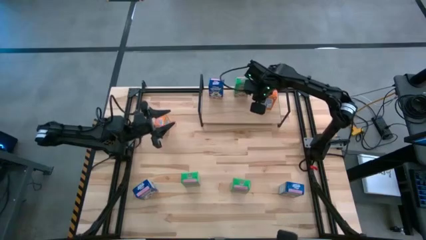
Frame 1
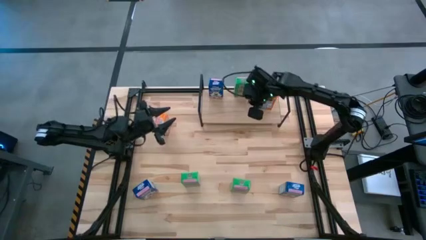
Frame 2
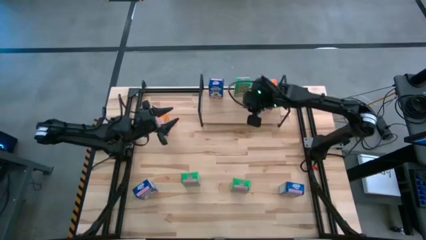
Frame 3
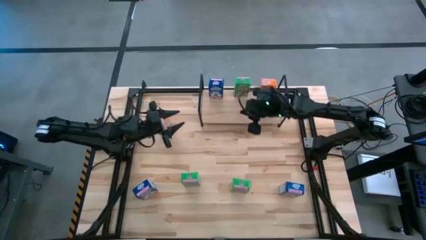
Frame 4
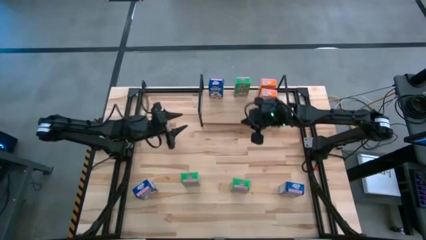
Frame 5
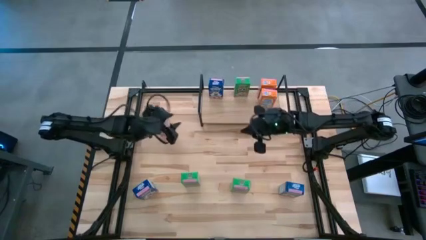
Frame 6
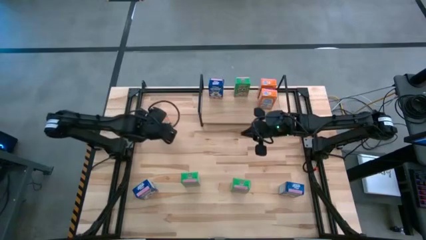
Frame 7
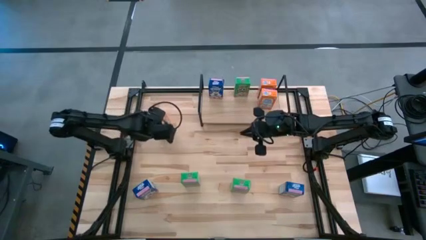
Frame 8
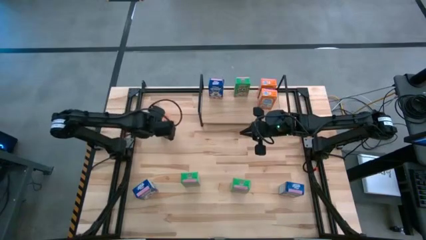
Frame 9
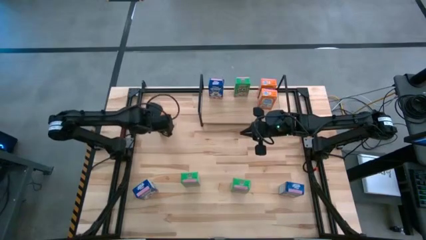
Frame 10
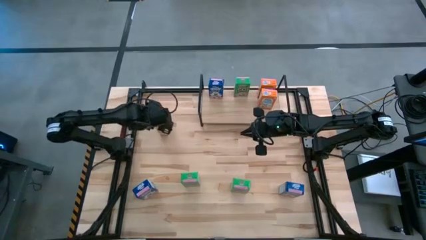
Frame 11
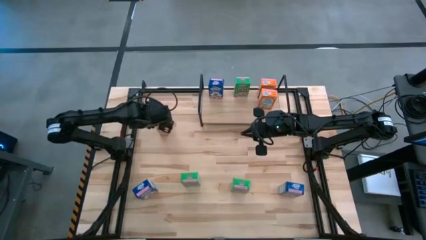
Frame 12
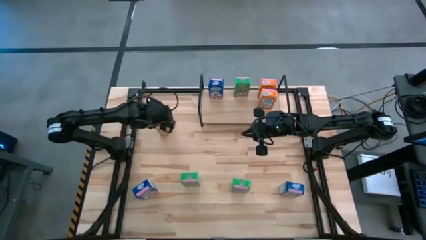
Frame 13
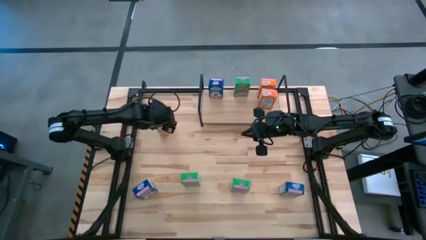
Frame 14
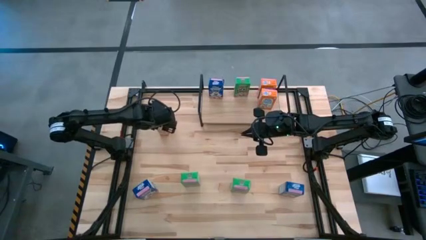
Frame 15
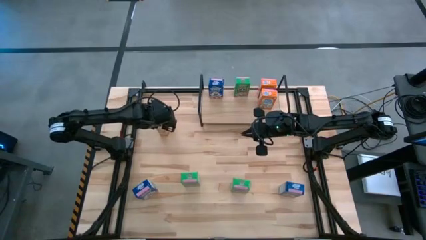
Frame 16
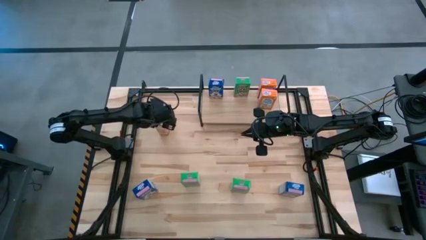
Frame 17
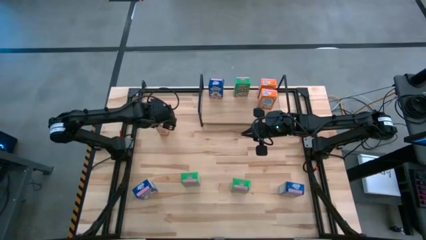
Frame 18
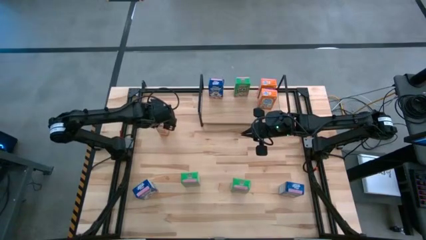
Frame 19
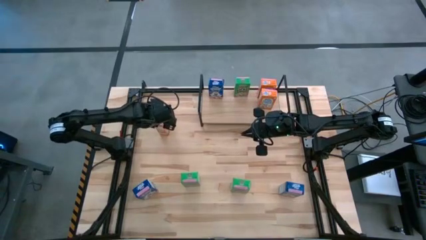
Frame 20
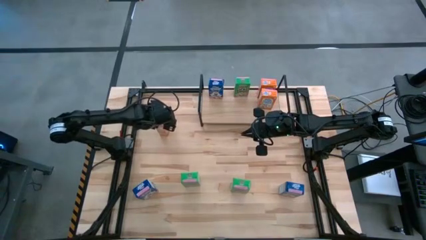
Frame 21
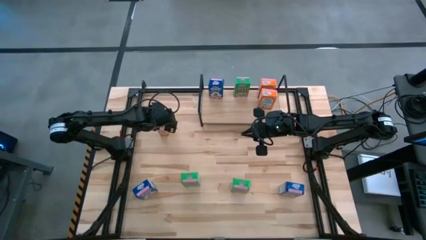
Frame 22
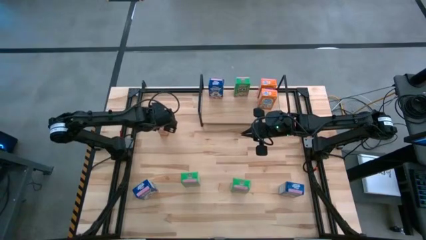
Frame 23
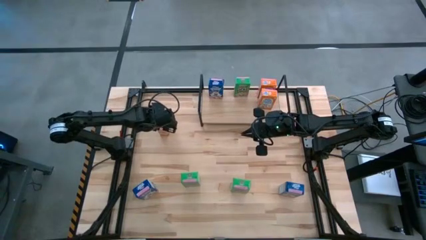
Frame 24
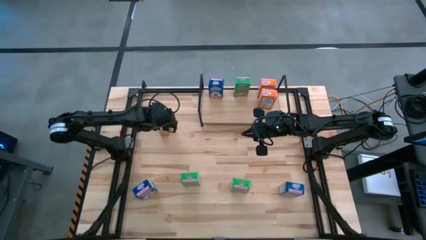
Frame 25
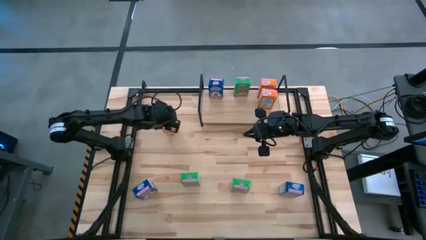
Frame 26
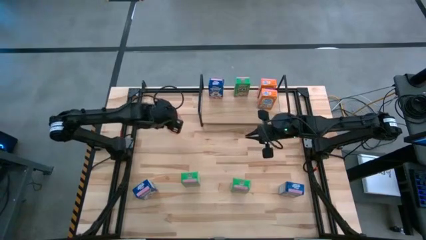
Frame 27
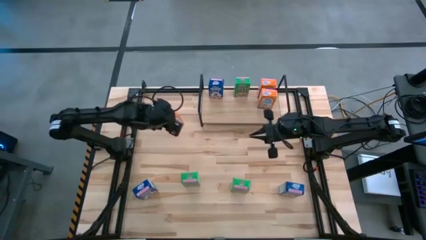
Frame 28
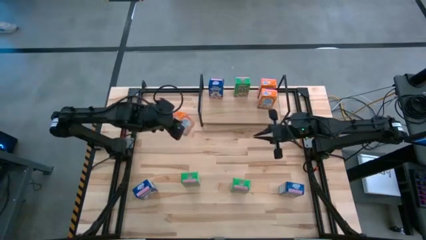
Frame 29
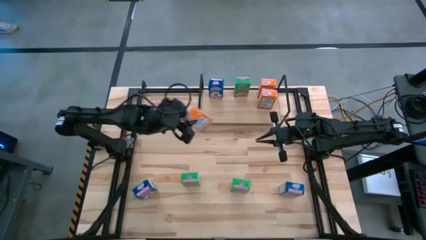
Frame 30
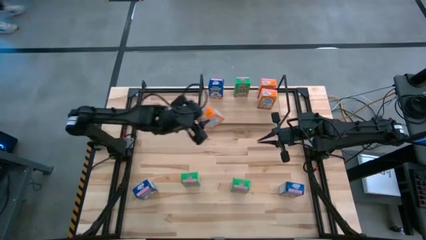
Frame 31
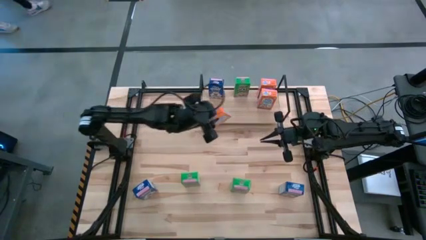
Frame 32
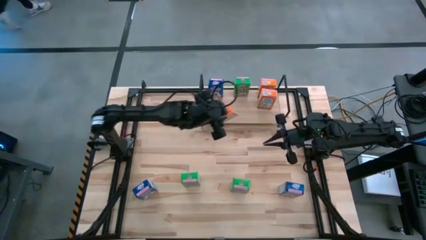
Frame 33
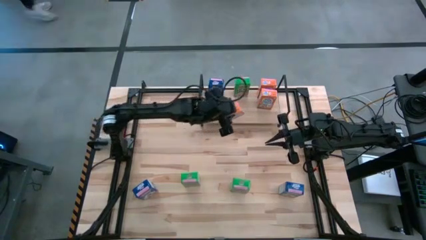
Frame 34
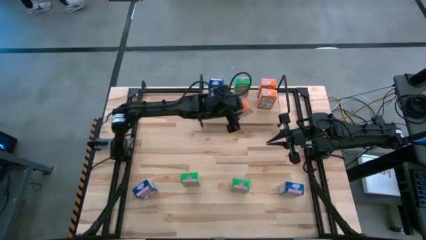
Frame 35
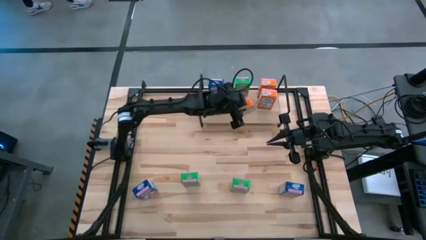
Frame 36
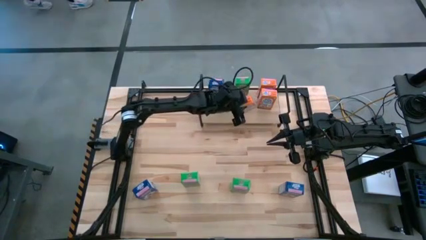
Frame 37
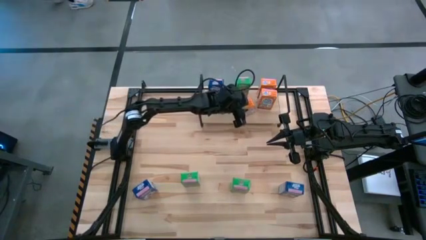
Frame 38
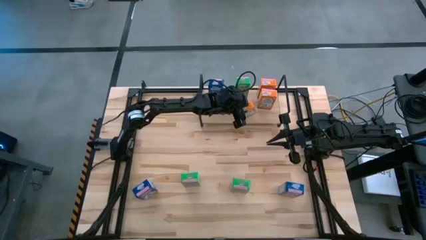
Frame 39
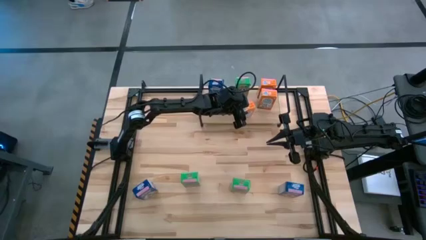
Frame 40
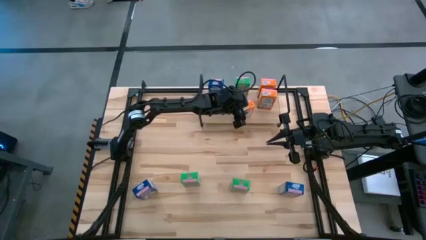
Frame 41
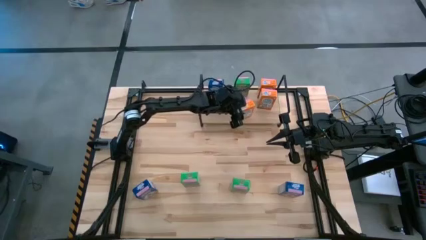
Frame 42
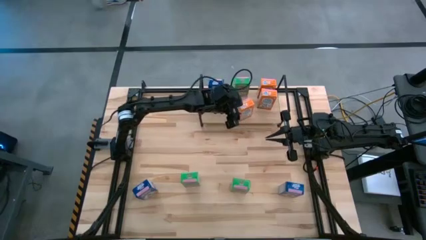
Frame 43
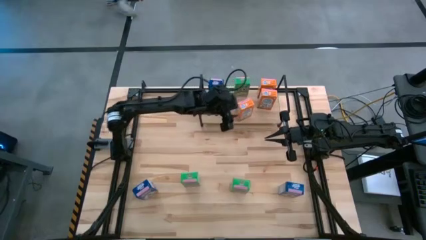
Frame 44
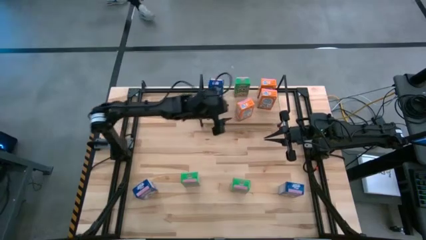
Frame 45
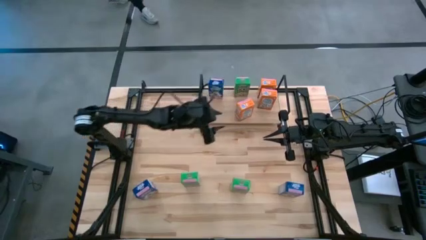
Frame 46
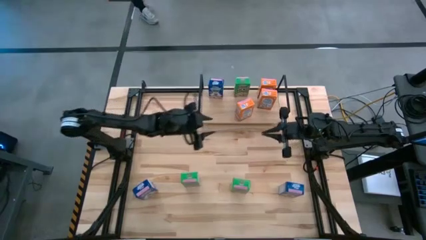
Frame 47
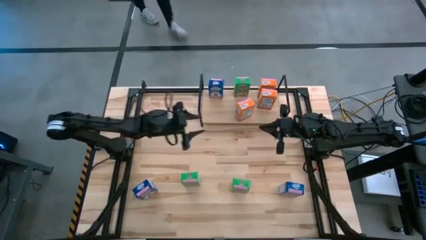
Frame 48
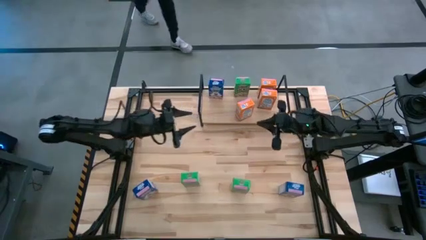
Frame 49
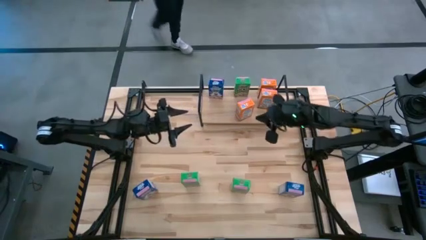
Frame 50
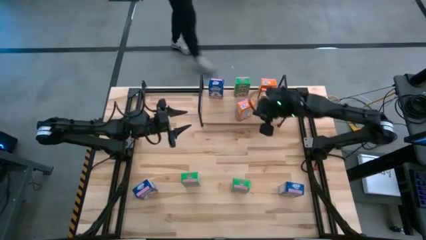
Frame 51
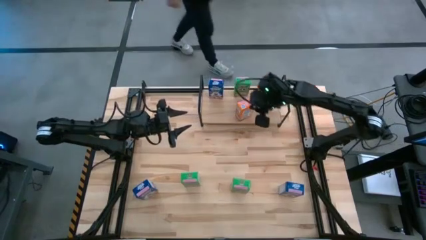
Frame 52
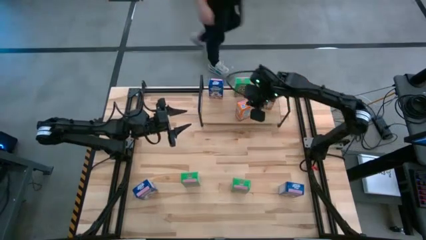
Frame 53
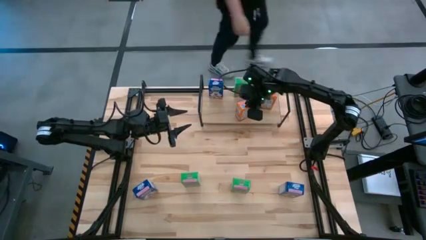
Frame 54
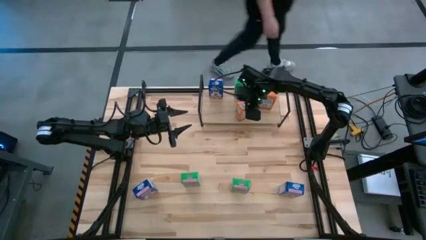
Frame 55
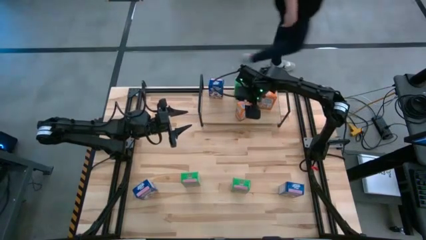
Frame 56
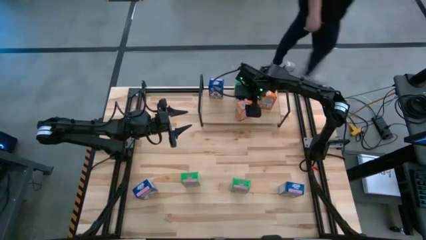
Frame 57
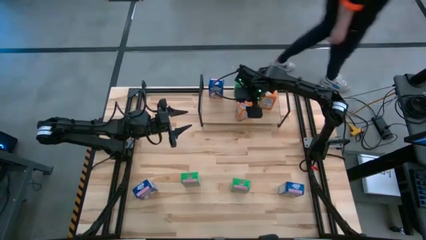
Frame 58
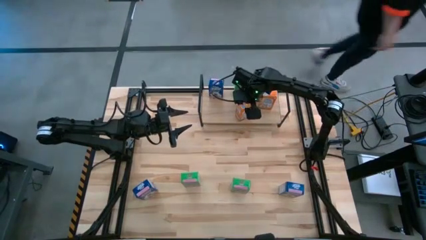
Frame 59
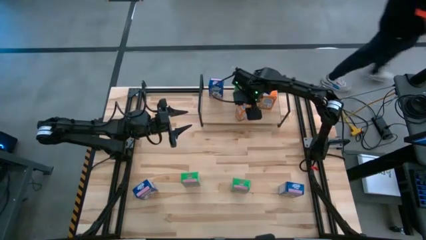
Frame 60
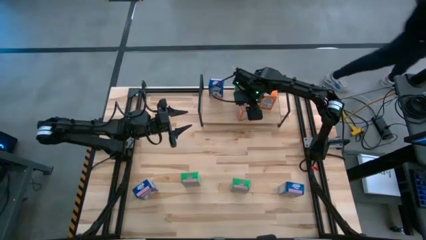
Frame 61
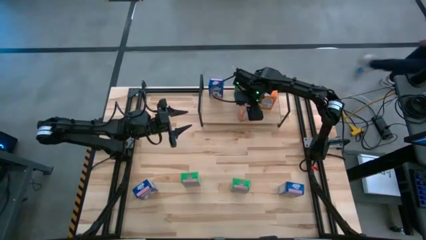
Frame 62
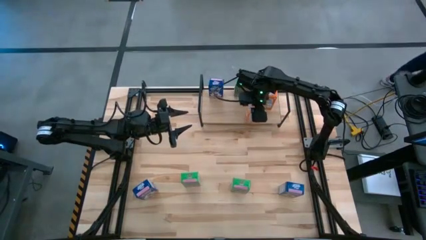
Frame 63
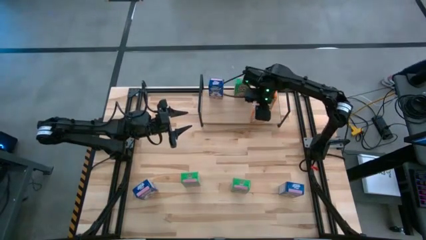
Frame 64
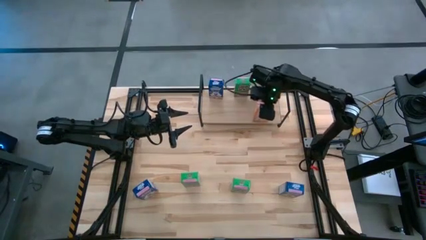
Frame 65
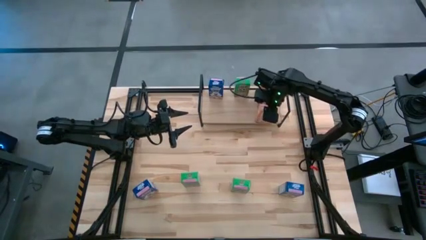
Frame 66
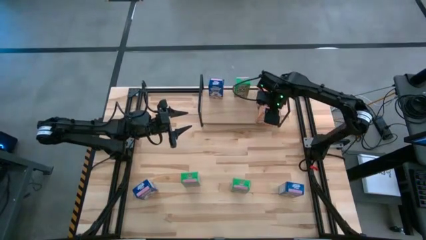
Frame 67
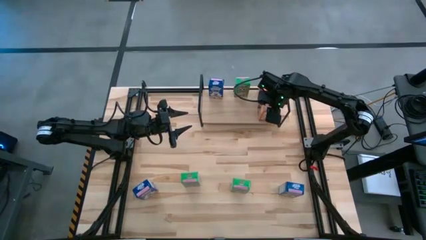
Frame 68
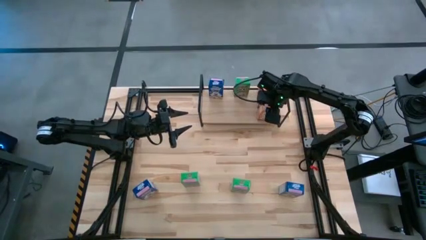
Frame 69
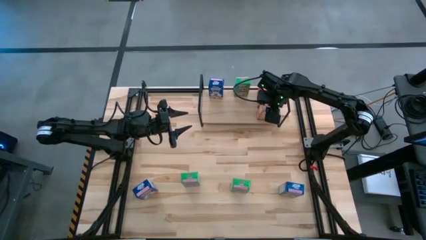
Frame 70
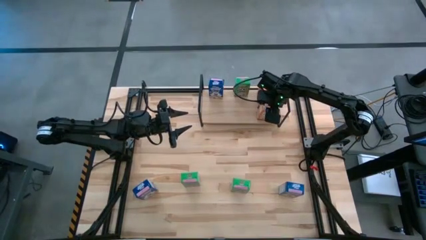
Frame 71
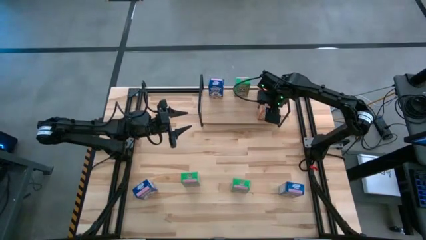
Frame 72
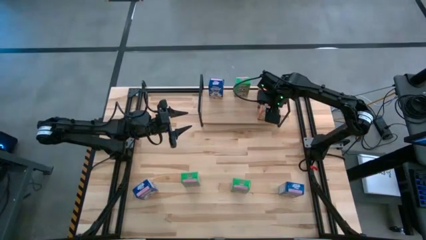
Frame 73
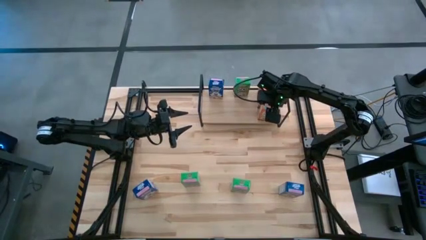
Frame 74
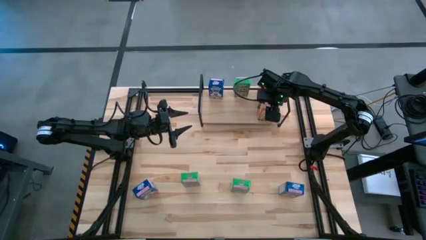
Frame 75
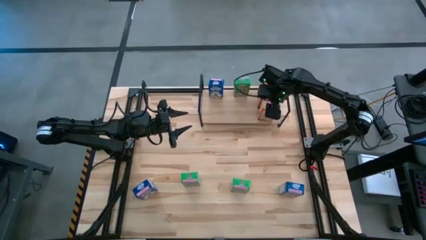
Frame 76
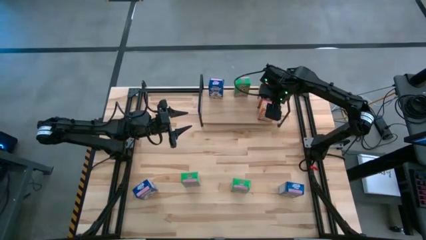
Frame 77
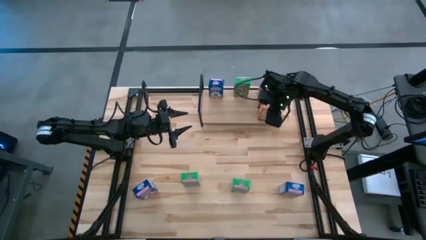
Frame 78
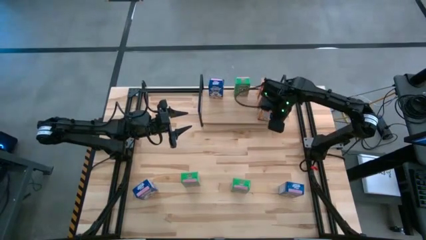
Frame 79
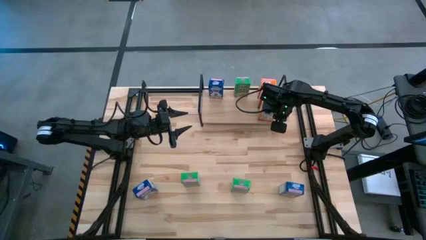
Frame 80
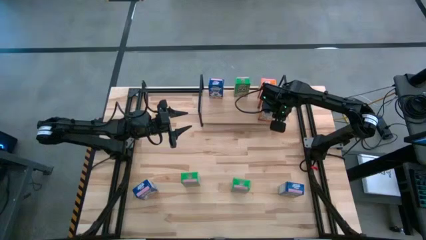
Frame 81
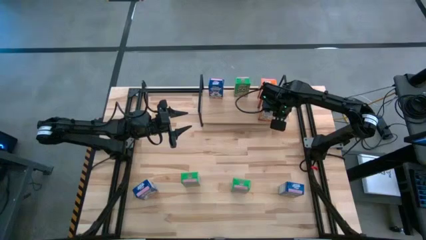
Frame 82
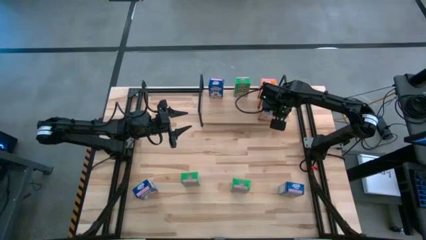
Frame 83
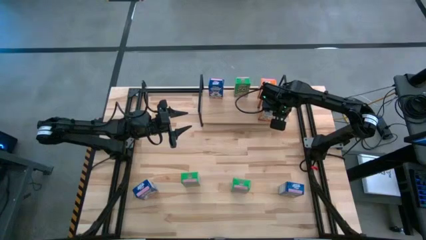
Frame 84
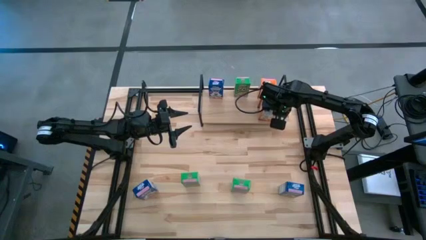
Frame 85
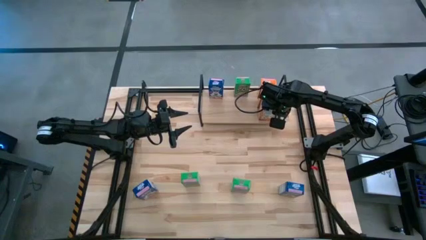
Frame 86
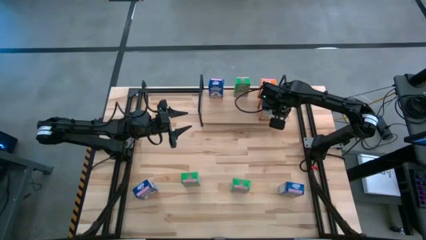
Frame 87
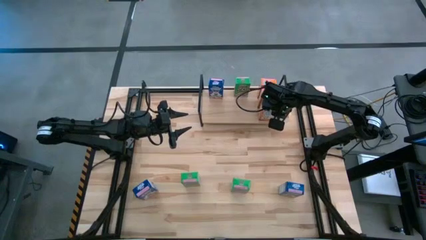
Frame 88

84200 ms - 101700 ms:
Task: Stack cereal on shelf
Put the orange cereal box aligned with the other orange cereal boxes on the shelf
